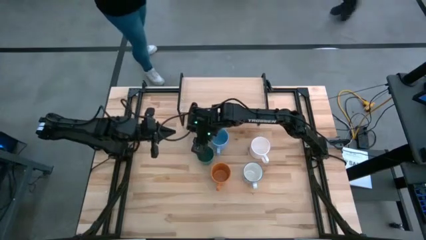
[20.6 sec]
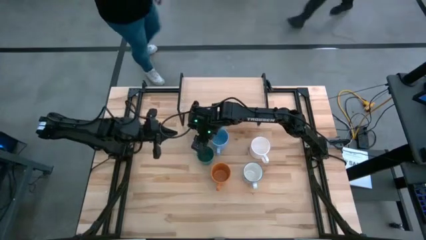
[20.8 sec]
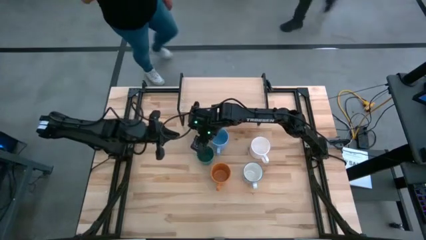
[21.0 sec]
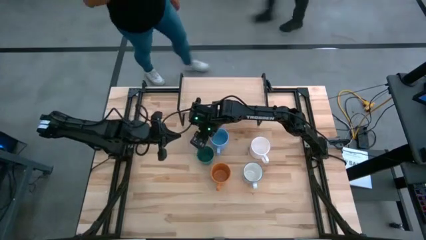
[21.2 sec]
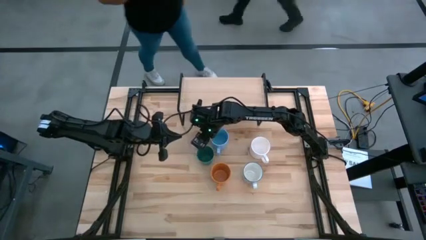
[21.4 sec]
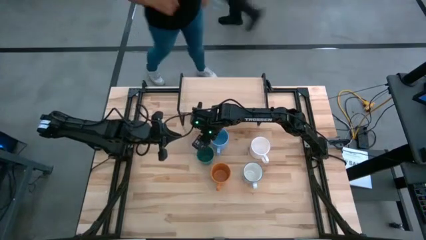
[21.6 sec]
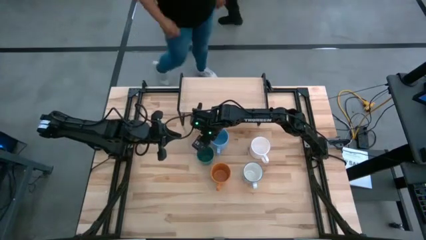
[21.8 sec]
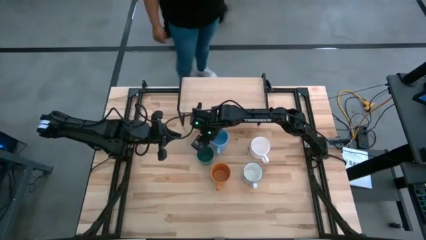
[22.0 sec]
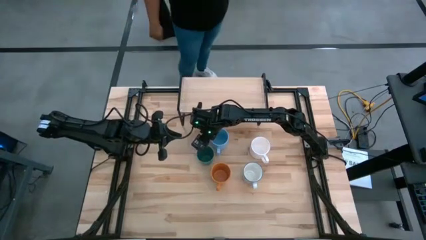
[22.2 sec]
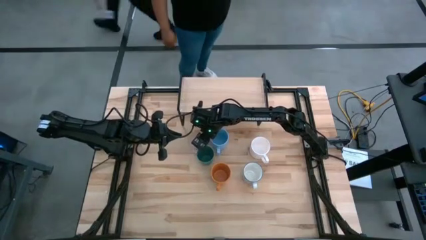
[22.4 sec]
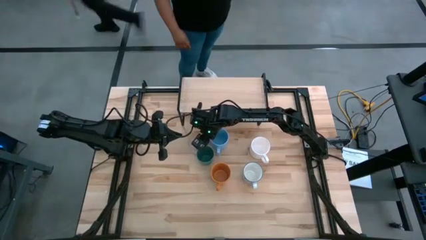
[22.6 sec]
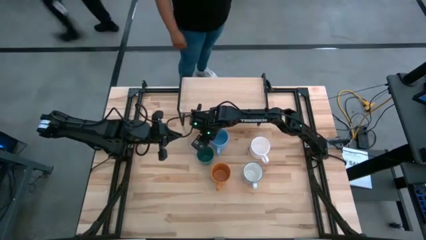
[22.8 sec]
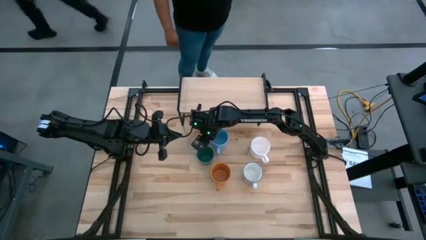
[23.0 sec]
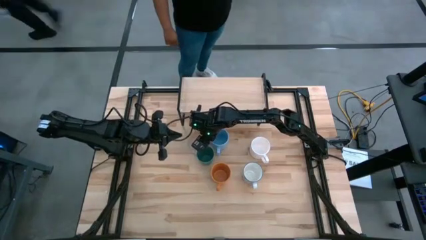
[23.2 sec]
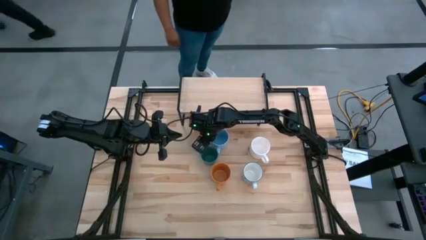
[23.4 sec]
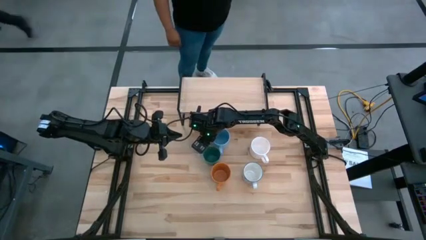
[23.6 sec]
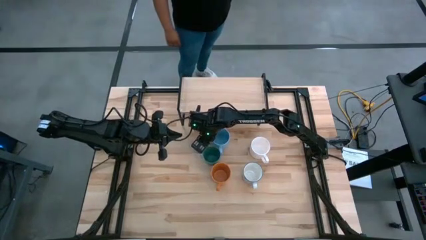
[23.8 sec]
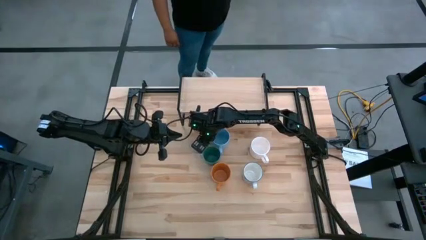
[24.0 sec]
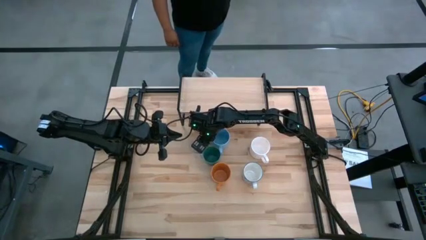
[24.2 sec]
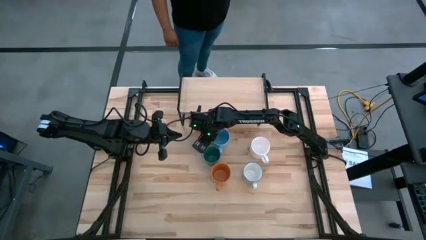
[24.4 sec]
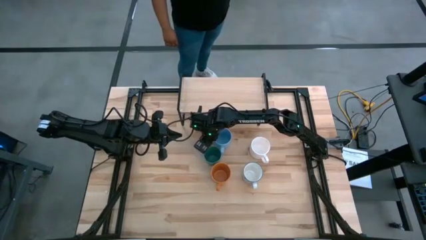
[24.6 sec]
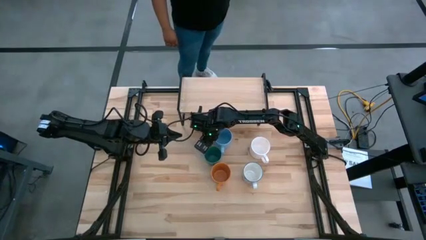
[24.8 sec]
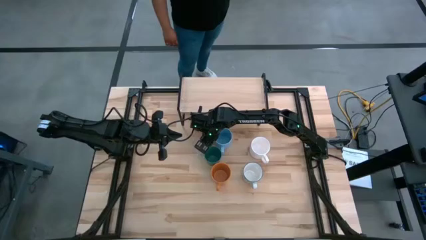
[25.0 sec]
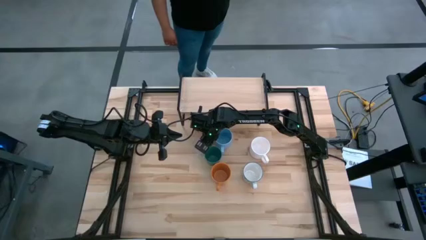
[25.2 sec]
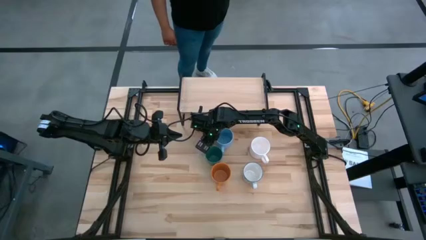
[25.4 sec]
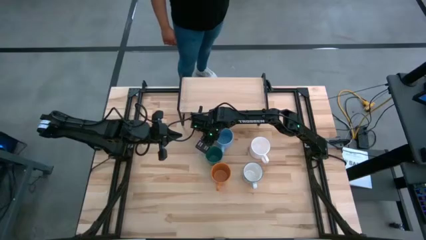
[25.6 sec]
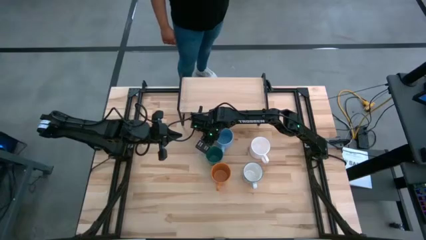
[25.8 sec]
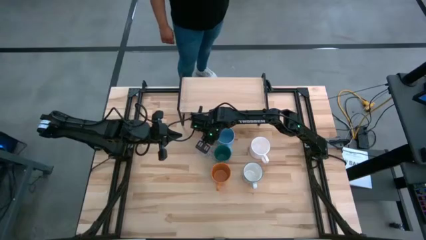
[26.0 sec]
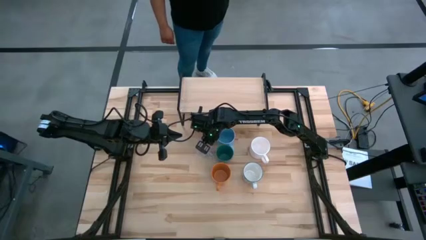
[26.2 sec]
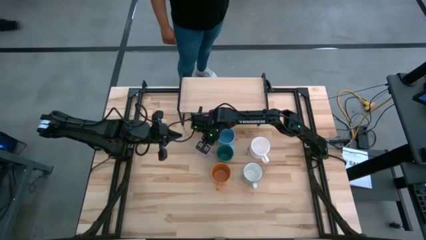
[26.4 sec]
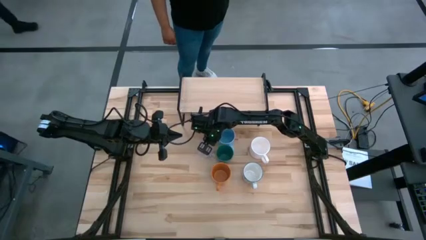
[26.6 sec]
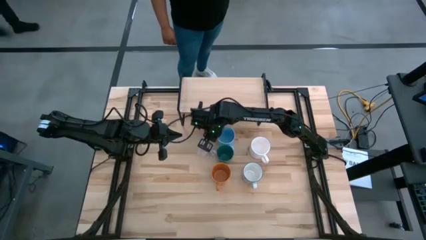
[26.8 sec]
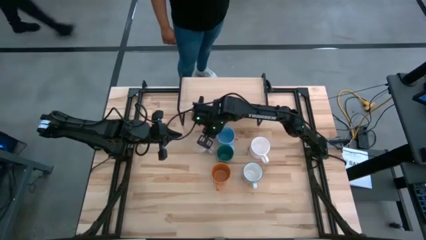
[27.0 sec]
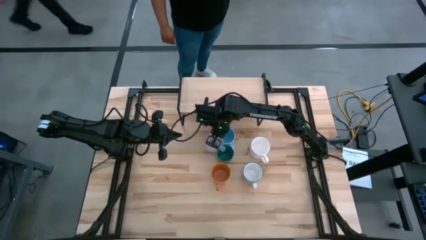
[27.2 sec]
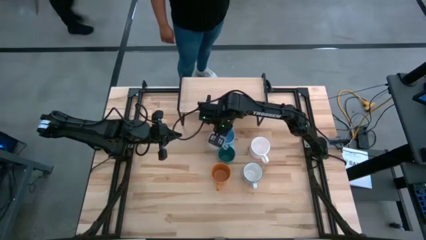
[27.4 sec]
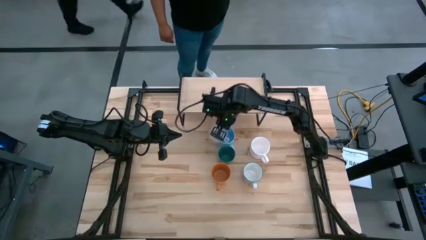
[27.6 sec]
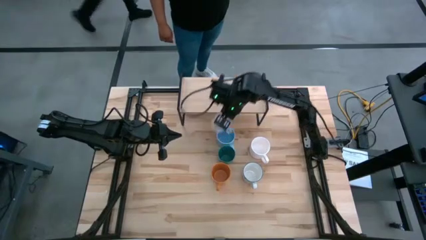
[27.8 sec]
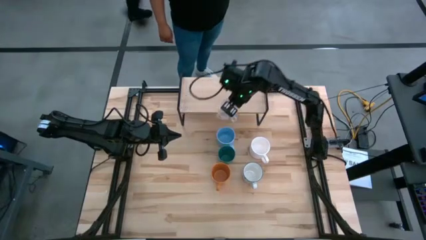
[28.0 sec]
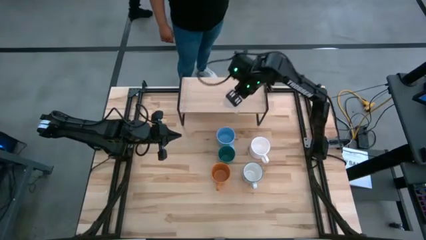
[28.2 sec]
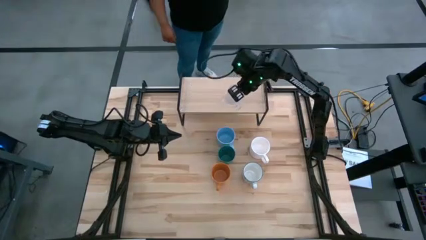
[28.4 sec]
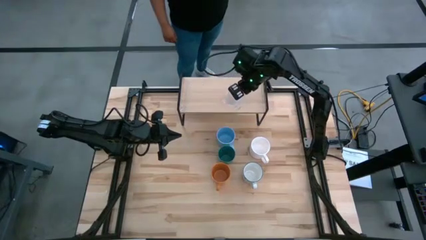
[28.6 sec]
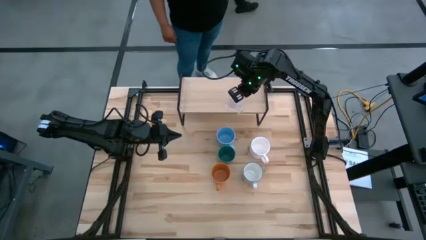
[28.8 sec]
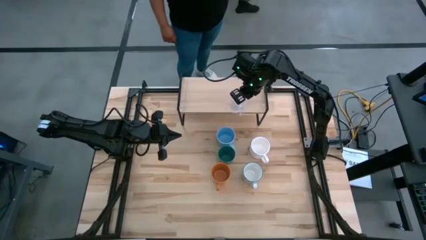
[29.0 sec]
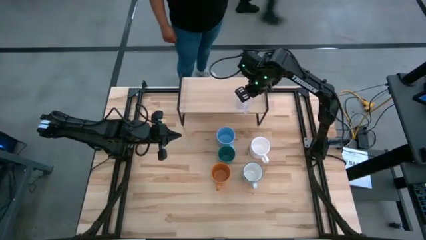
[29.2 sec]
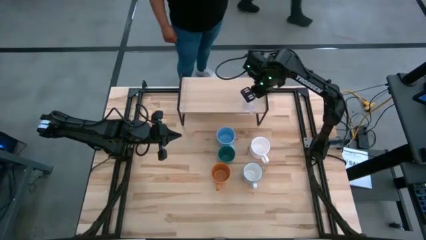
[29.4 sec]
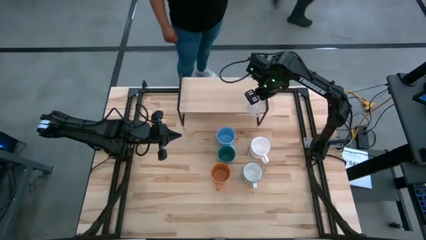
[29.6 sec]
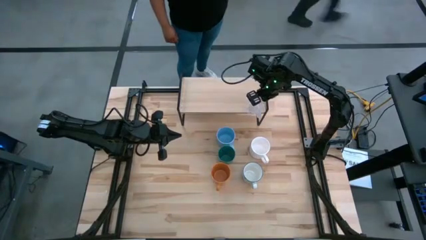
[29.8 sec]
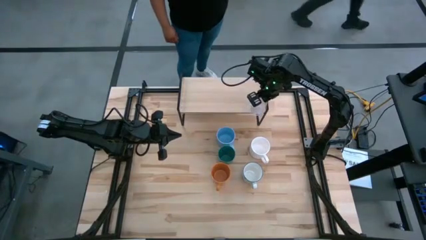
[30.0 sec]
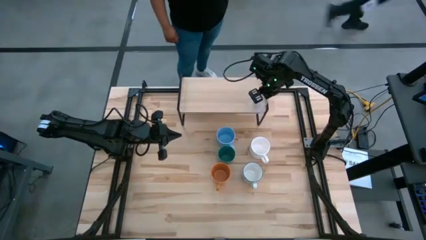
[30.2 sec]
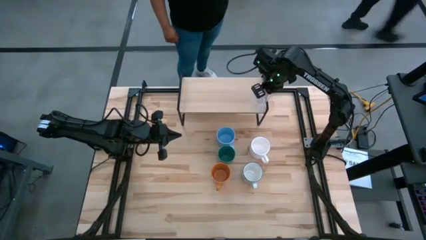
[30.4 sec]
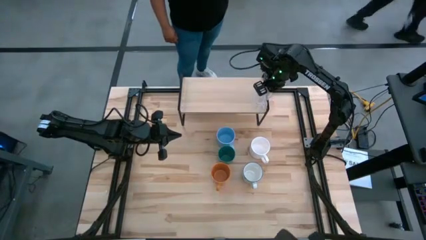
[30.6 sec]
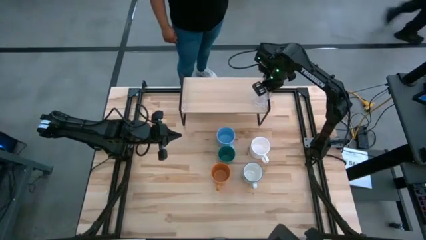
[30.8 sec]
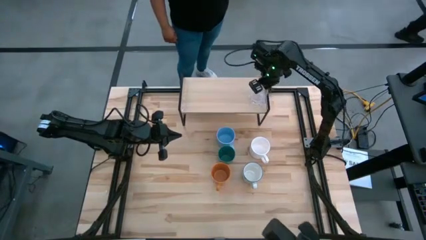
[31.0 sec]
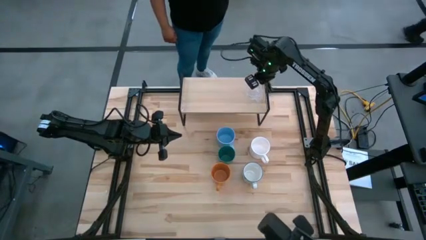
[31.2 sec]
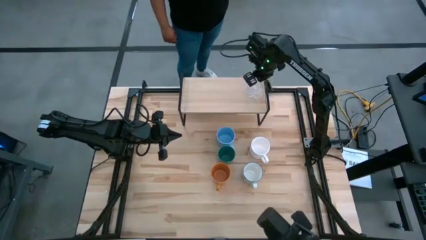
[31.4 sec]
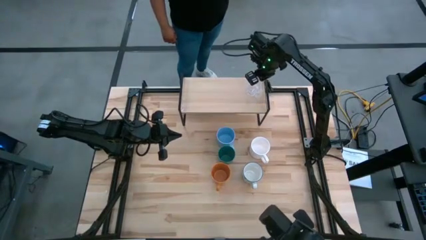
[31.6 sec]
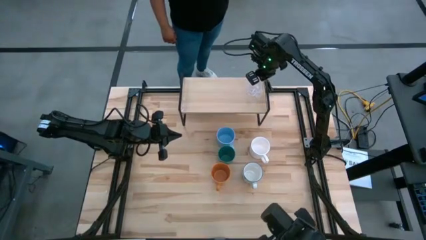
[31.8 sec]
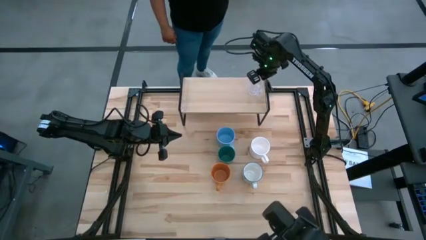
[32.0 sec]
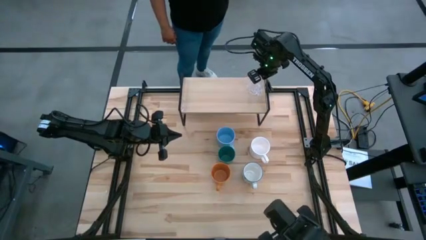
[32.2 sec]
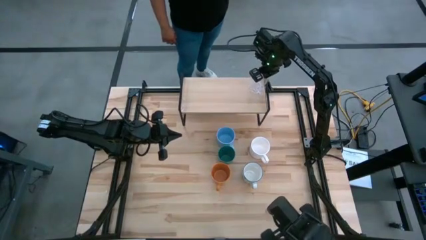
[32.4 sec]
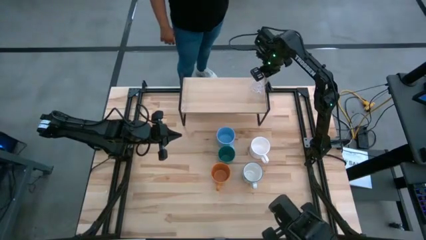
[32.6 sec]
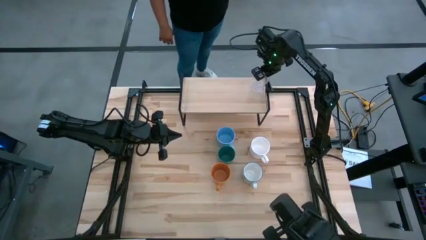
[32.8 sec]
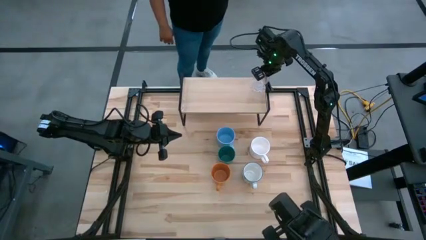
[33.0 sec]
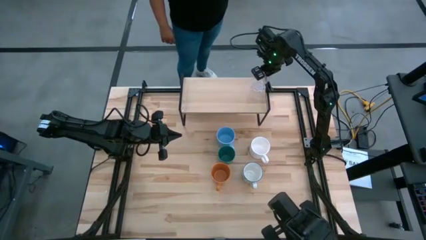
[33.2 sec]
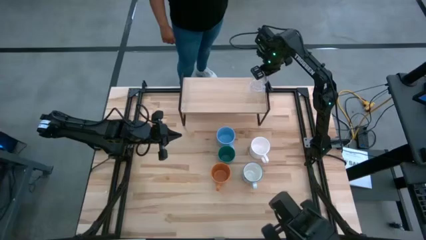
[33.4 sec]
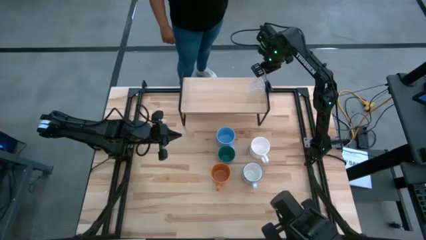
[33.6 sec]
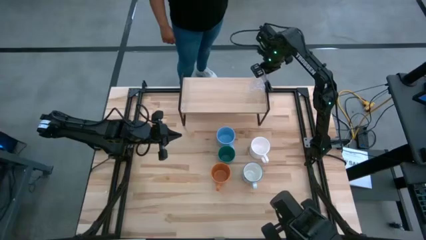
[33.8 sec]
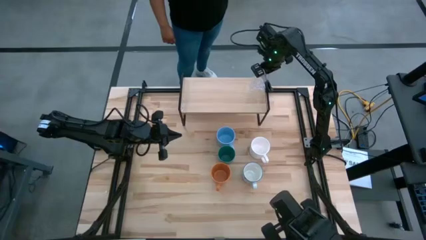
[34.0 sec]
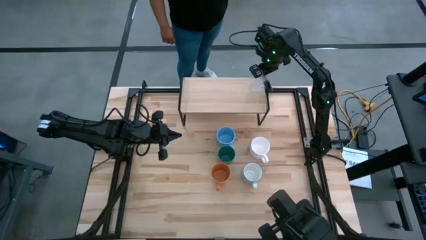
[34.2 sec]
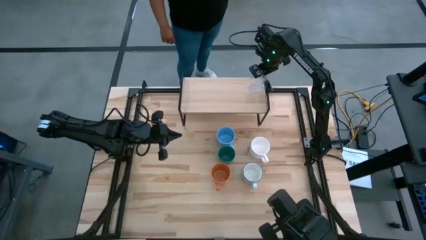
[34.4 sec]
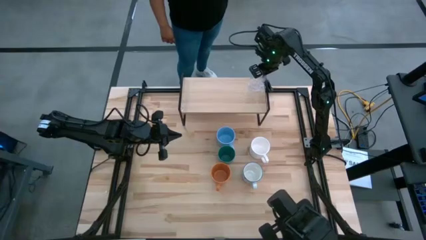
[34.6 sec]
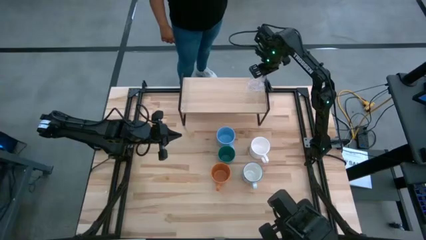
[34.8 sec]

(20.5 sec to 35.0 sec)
Task: Stack small to large cups/mugs on shelf
Put the transparent mug on the shelf

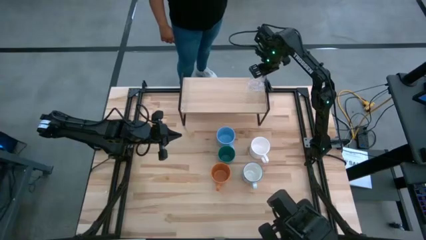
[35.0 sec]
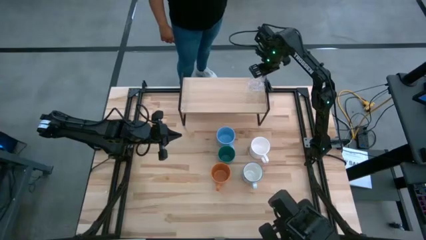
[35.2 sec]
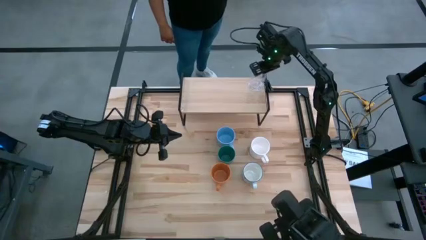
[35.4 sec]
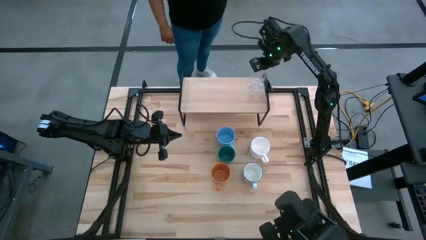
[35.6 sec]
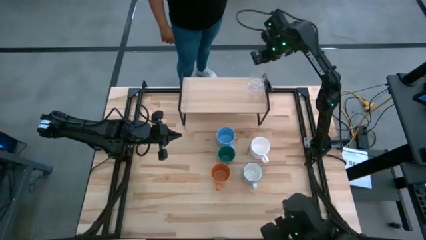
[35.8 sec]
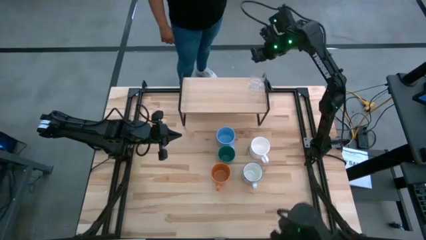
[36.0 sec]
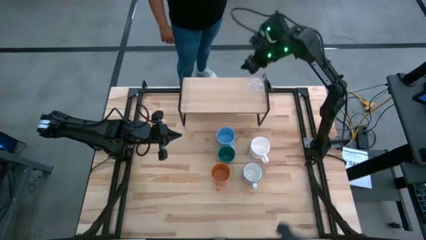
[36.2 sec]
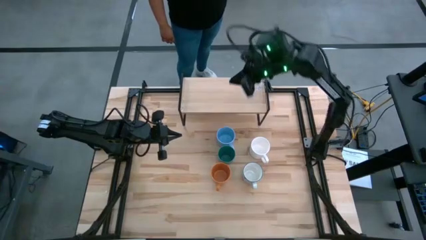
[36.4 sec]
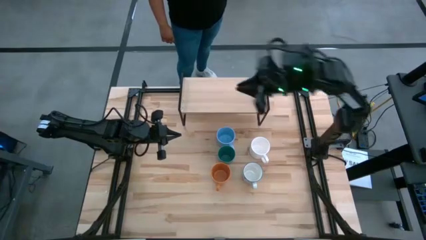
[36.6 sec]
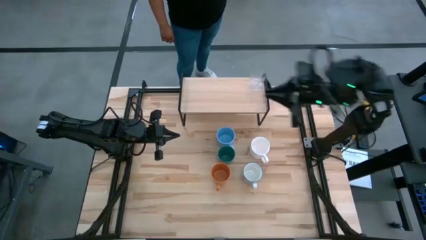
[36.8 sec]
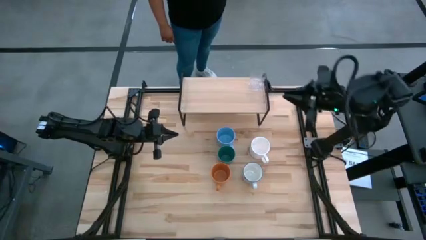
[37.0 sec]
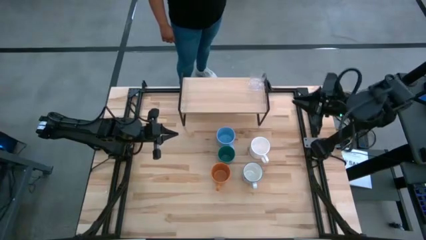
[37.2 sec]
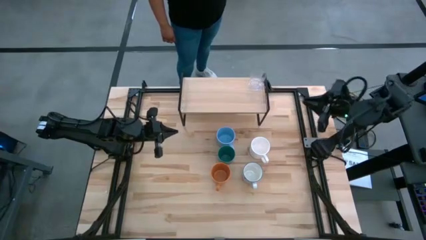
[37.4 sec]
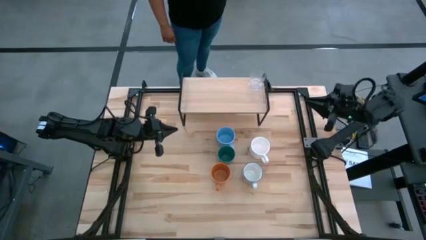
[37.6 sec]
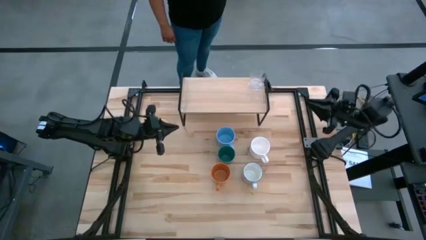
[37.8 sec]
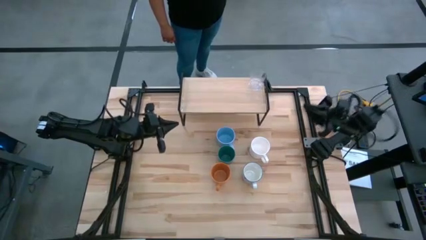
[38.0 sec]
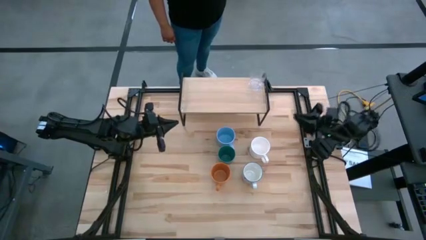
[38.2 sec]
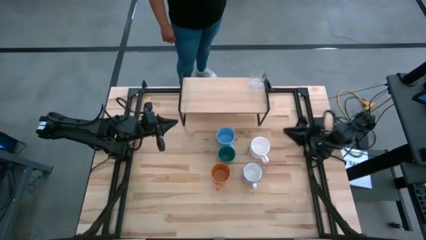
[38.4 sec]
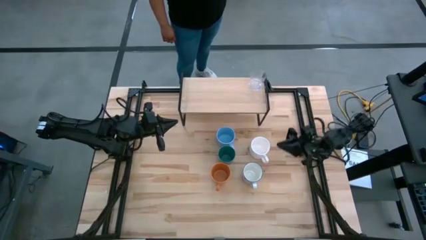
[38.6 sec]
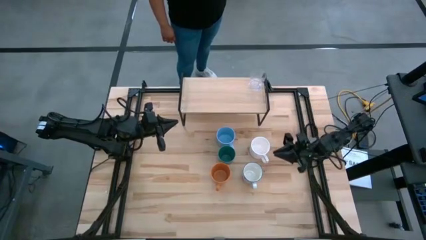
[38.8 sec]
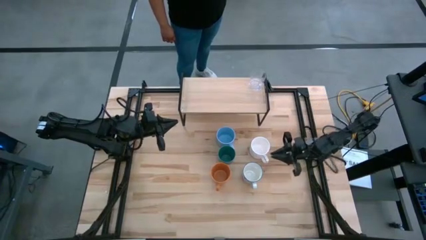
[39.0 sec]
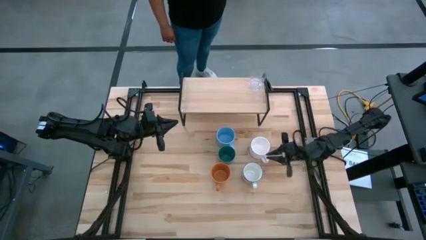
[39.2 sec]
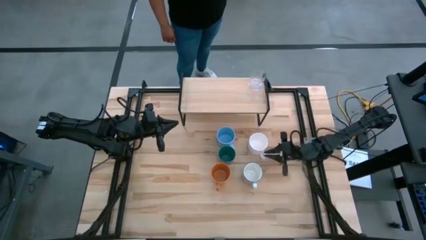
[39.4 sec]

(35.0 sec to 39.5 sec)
Adjust the white mug
